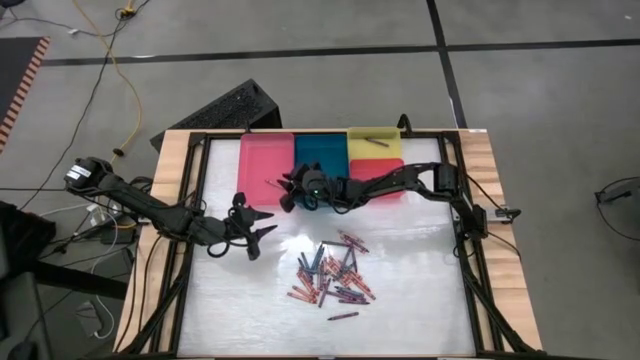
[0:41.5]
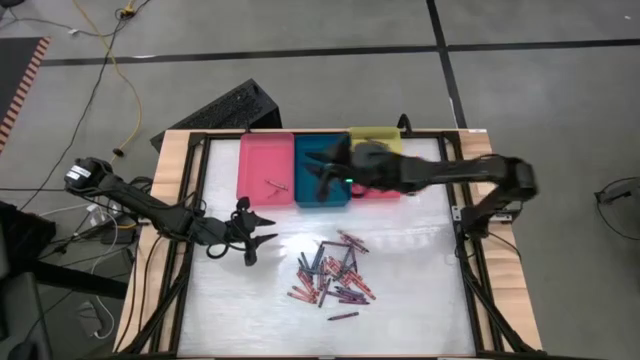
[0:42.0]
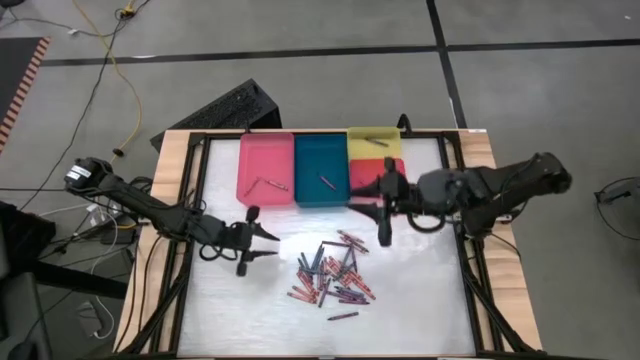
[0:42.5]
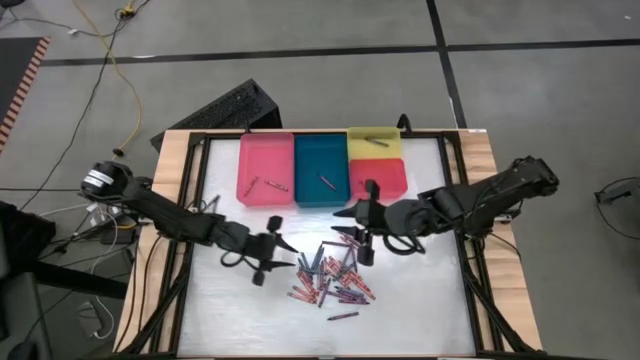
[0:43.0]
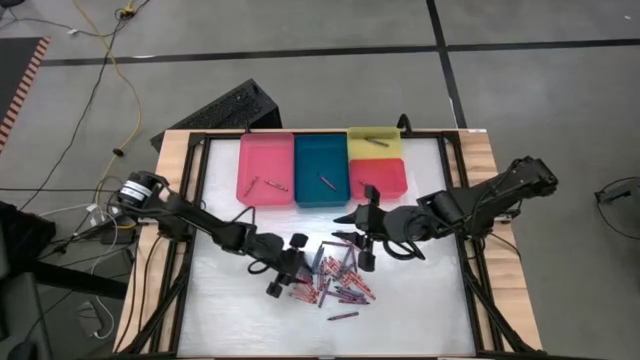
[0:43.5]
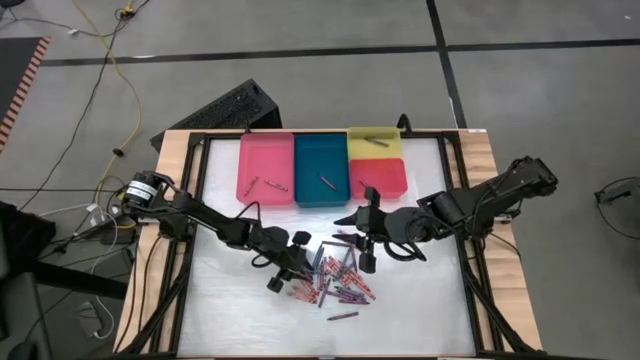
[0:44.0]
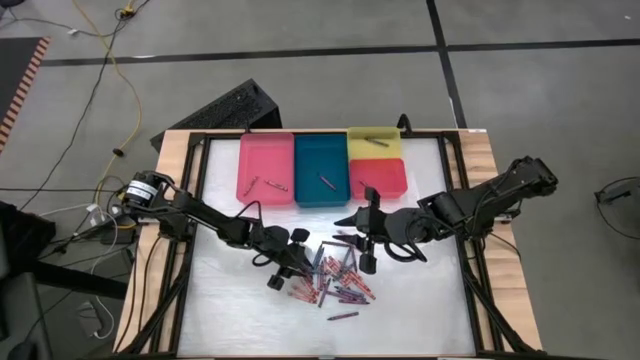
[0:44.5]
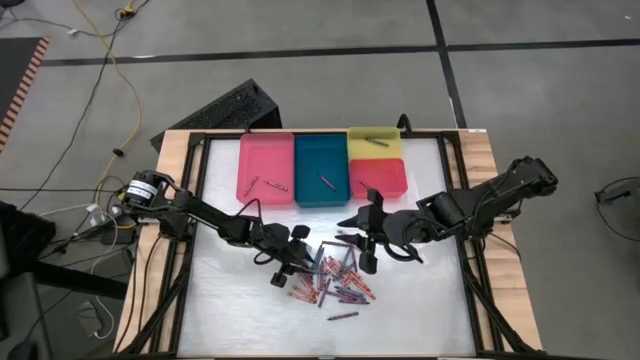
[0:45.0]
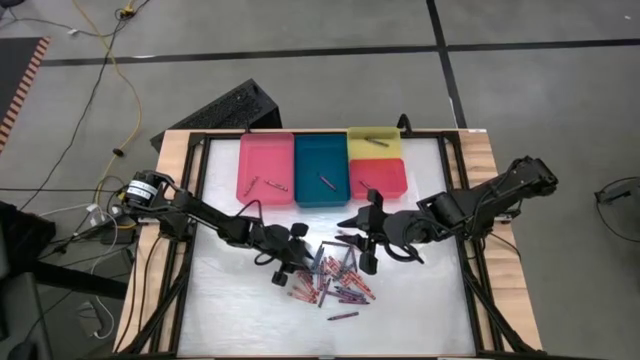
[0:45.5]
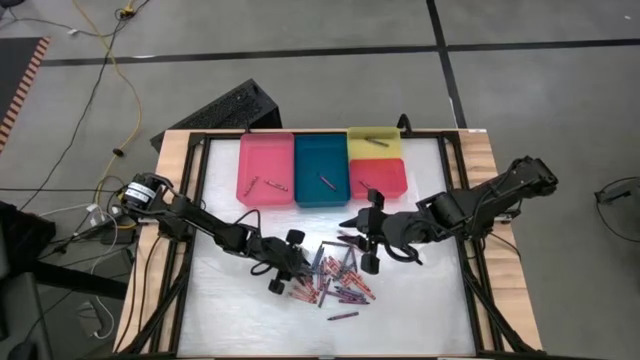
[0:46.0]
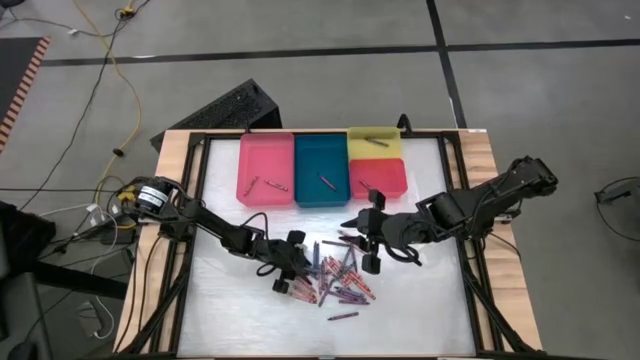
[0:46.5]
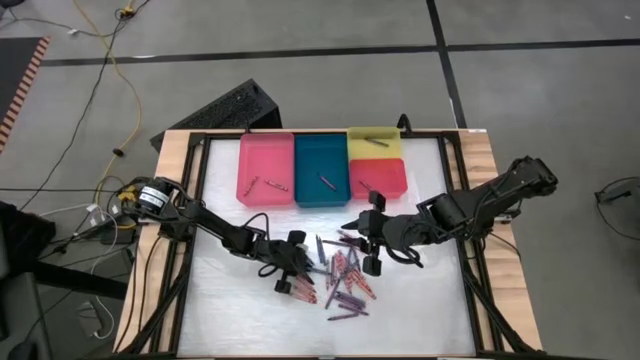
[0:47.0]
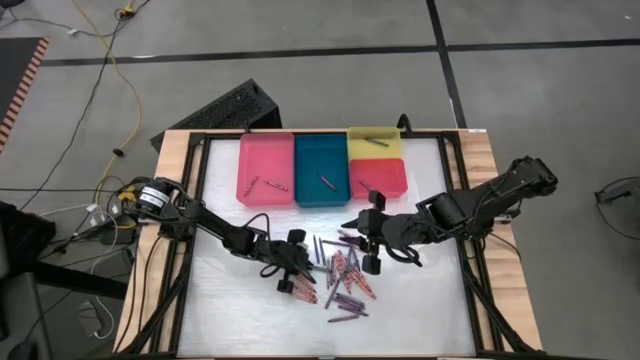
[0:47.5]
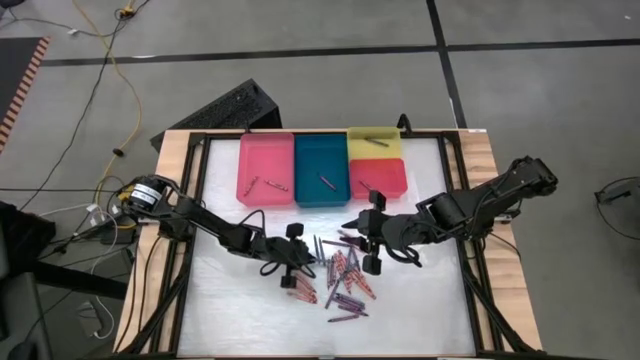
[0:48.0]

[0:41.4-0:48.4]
Task: Sort crayons
Put the blue crayon into the yellow bin

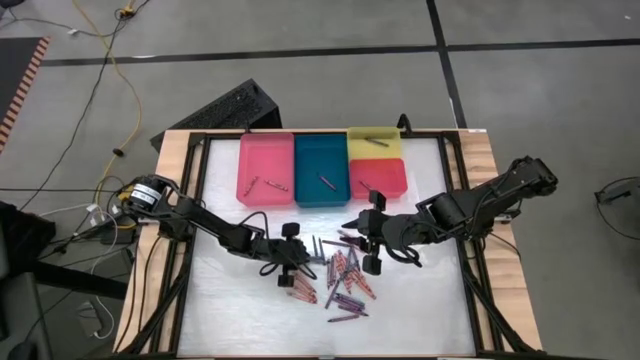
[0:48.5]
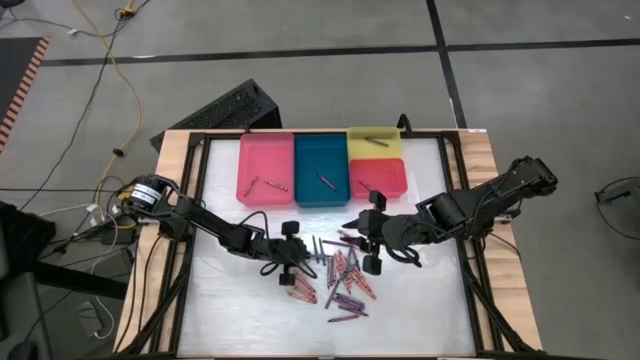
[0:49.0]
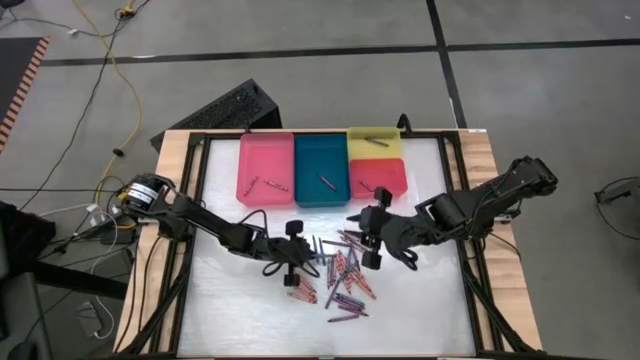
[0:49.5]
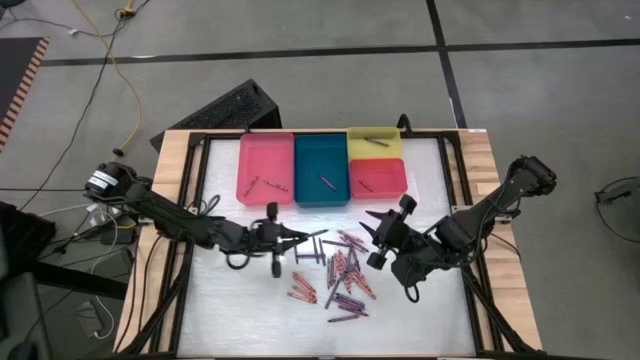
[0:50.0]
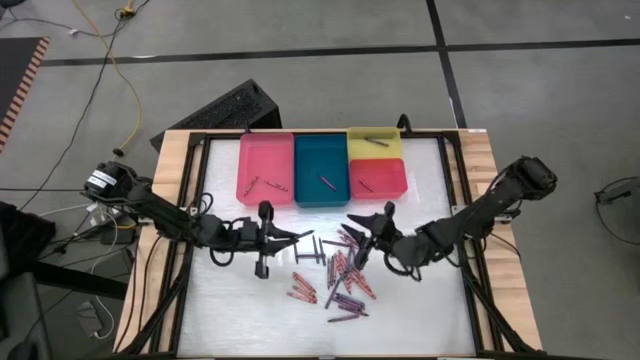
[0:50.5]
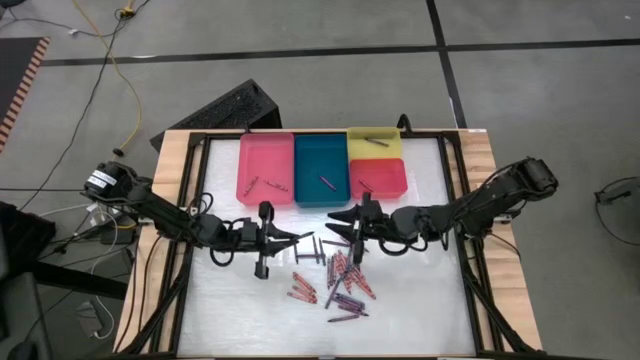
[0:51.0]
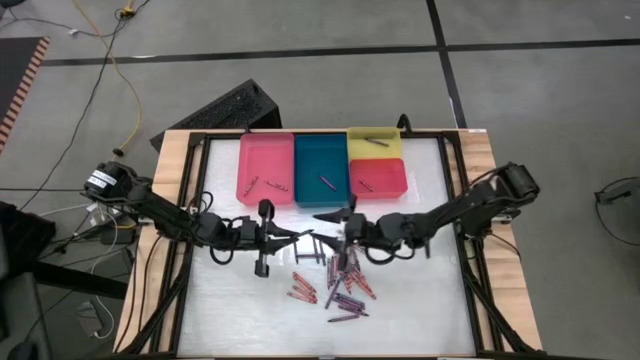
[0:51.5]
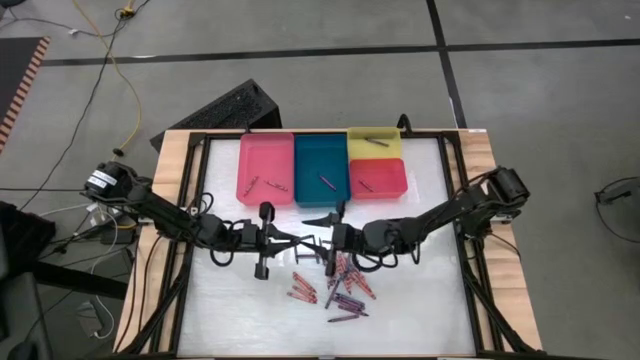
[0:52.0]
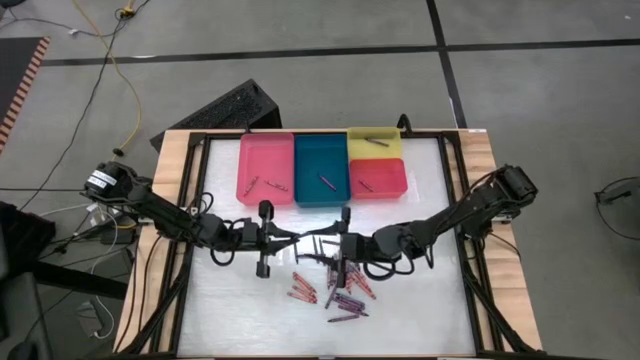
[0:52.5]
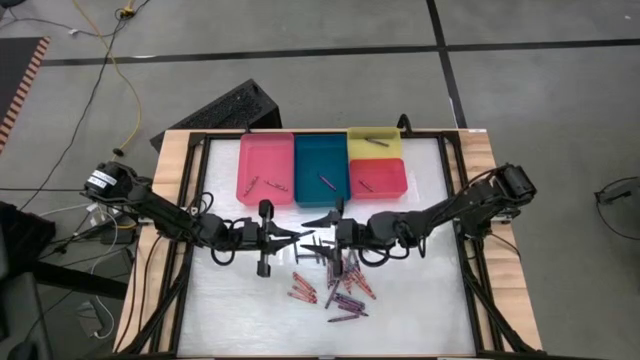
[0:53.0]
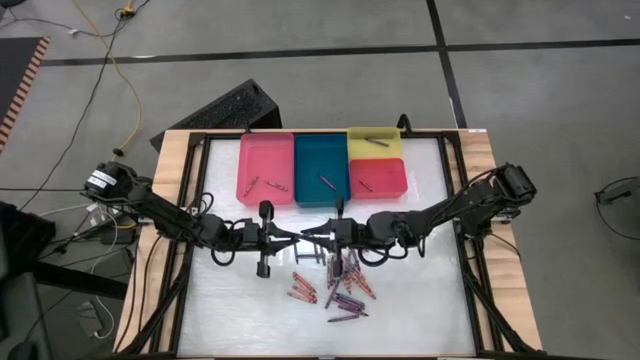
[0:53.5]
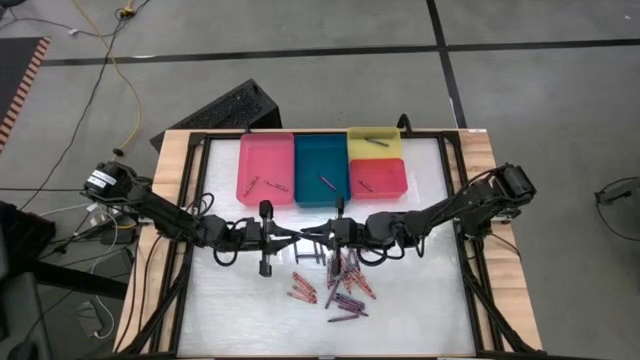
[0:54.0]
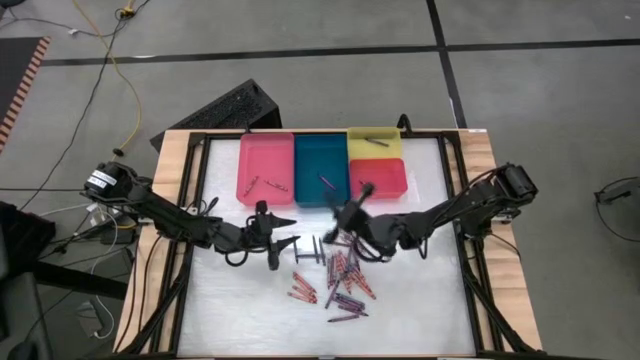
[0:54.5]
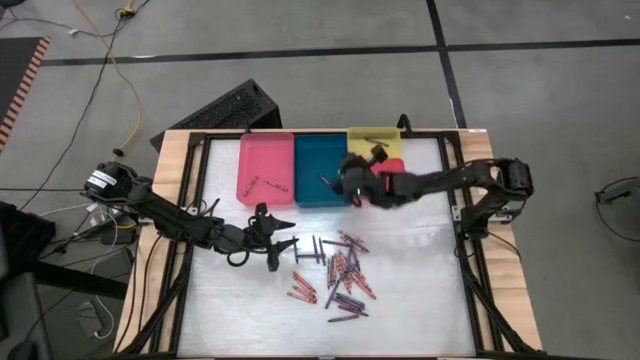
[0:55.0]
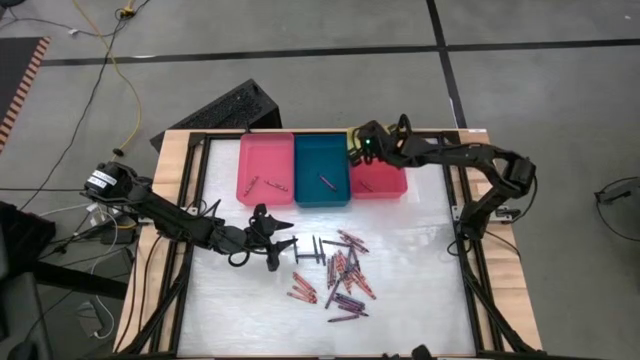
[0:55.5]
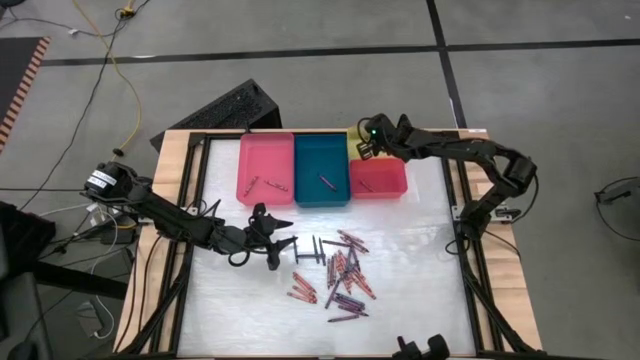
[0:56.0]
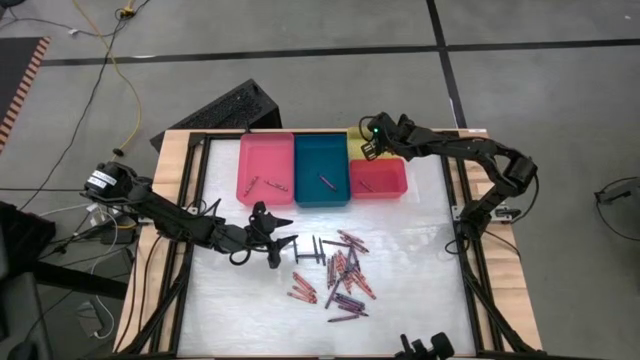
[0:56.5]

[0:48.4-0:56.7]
Put the blue crayon into the yellow bin

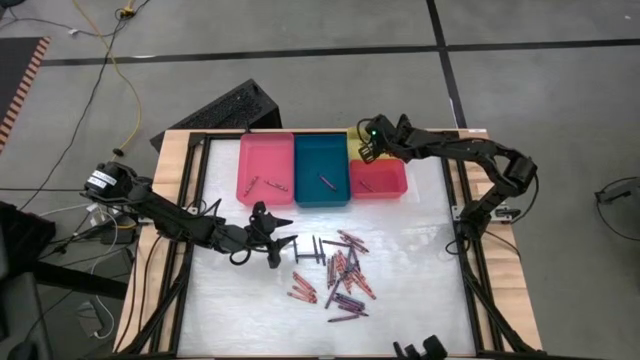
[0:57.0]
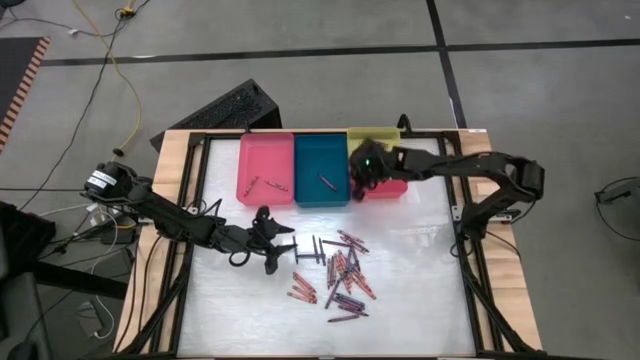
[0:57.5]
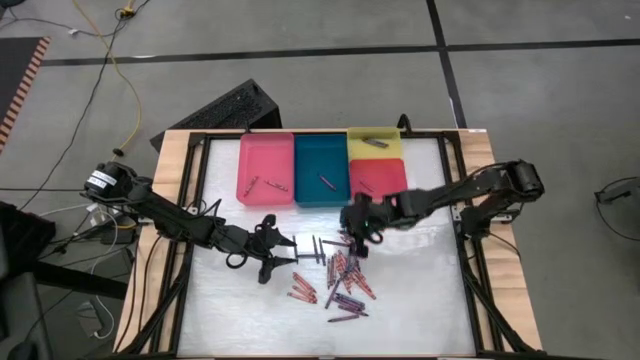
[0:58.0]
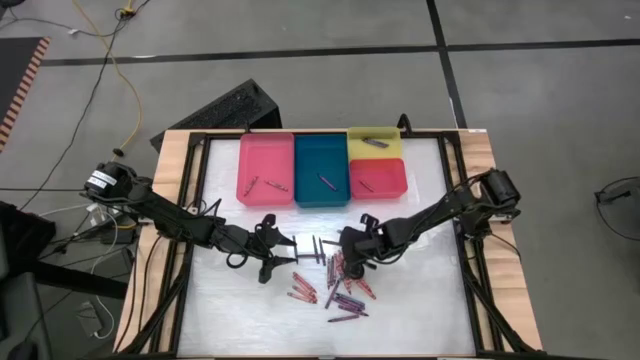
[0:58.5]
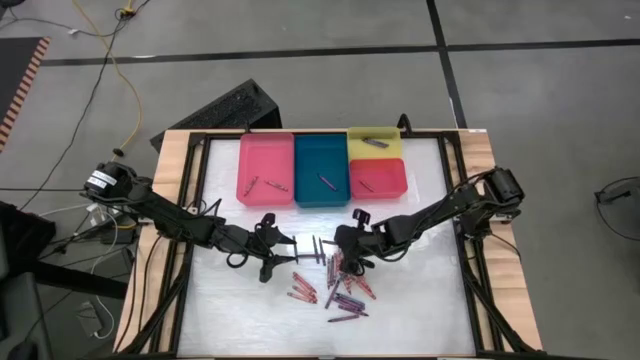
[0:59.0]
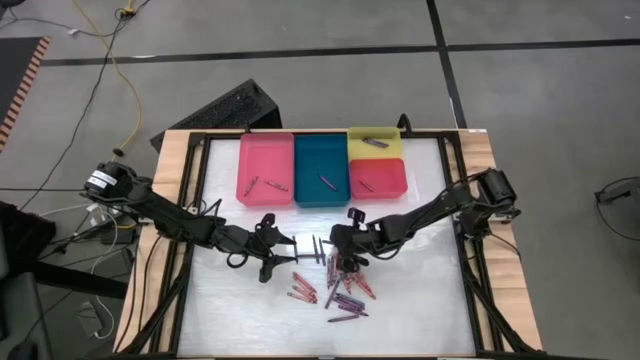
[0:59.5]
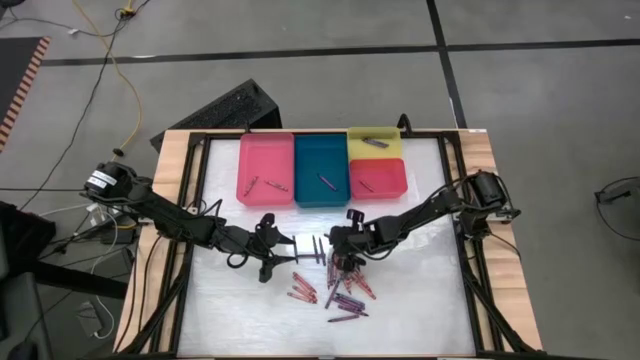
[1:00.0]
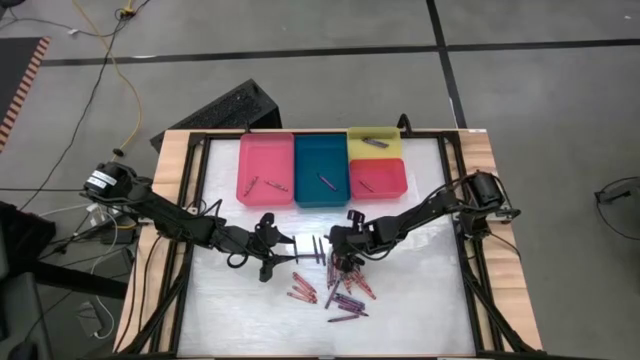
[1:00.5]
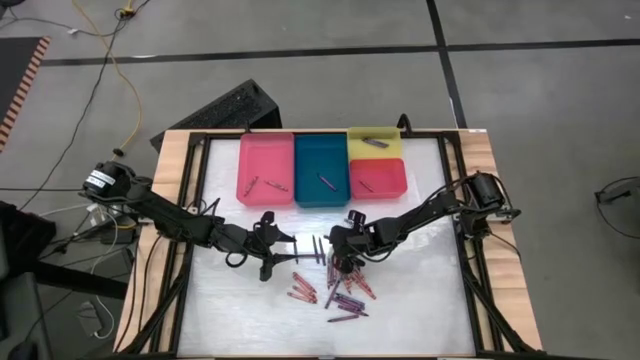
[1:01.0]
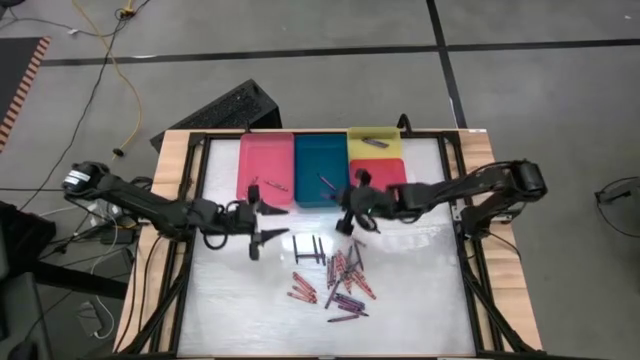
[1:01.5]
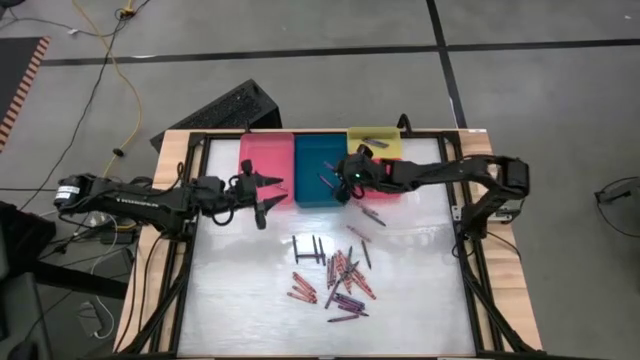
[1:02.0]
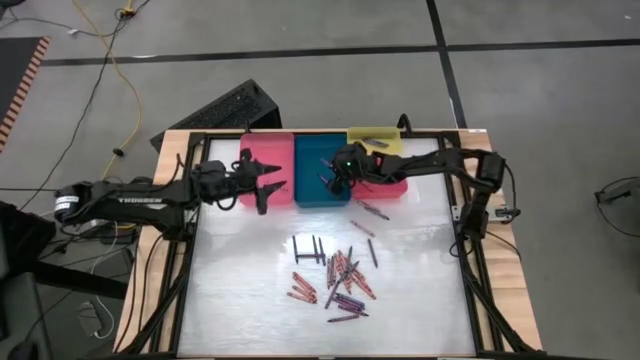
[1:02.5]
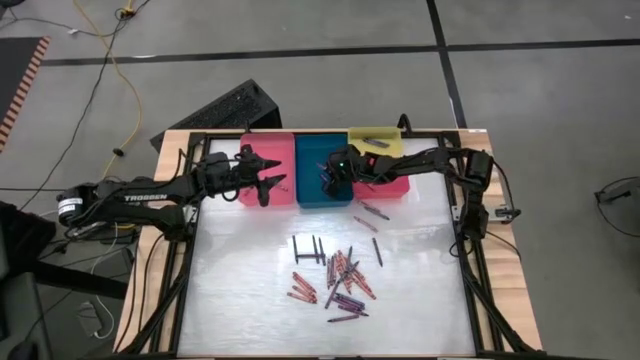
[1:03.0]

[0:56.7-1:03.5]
Put the violet crayon into the blue bin
